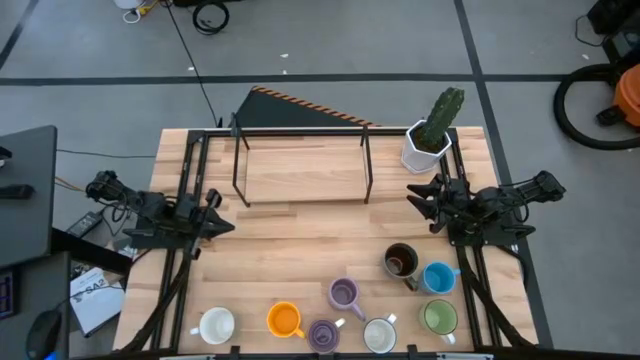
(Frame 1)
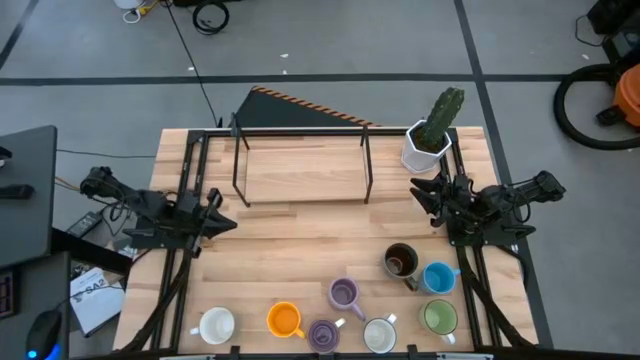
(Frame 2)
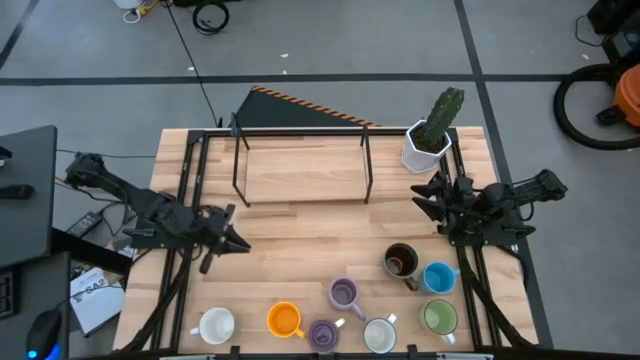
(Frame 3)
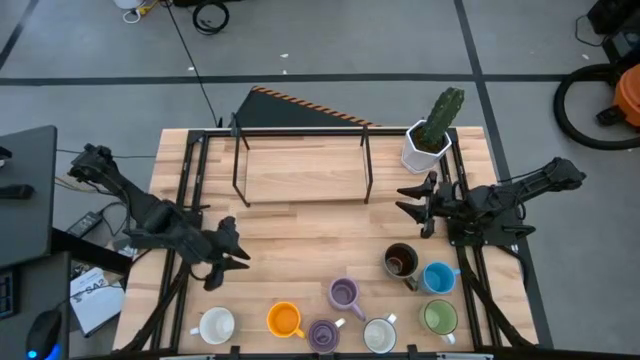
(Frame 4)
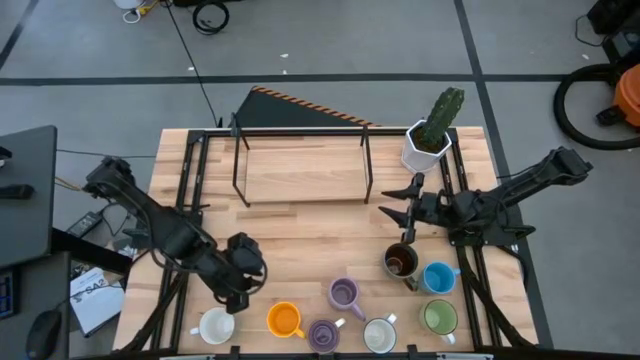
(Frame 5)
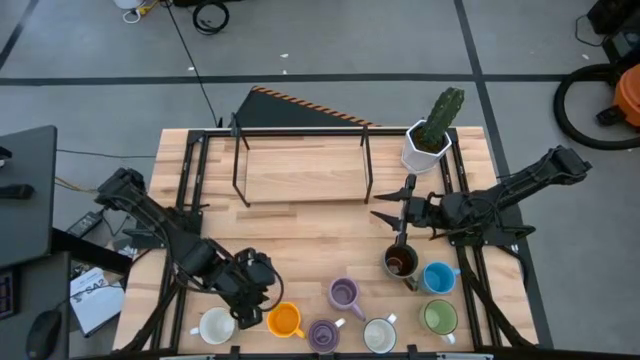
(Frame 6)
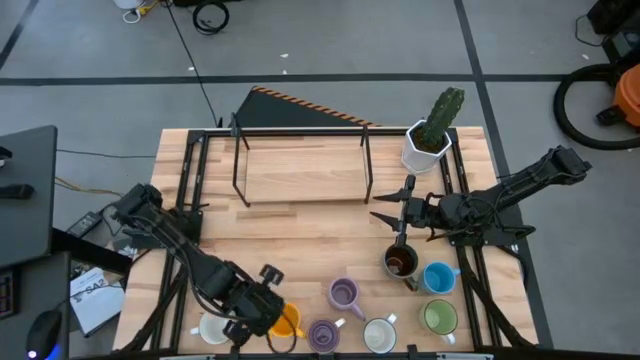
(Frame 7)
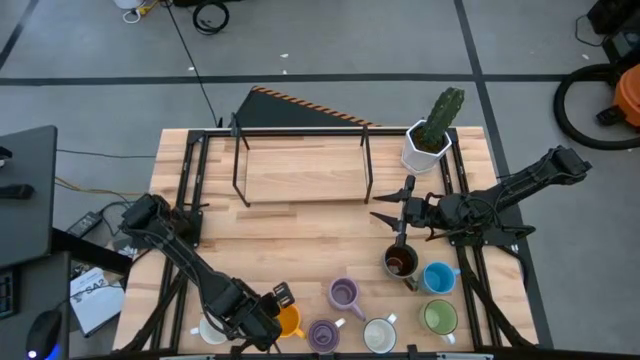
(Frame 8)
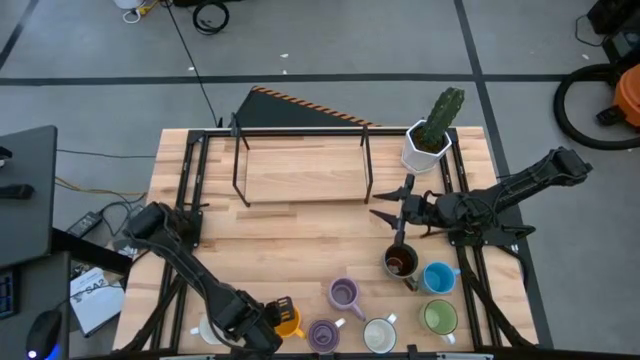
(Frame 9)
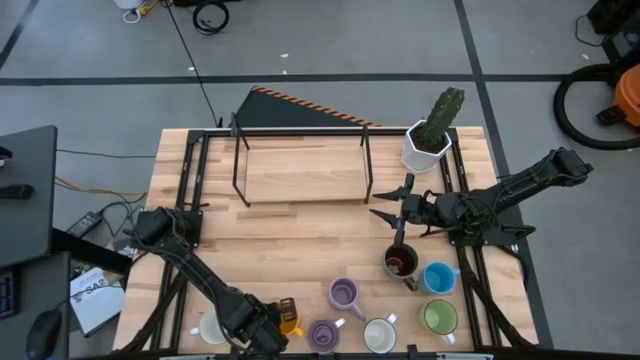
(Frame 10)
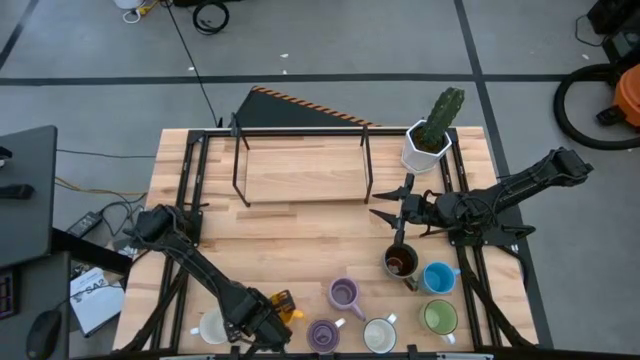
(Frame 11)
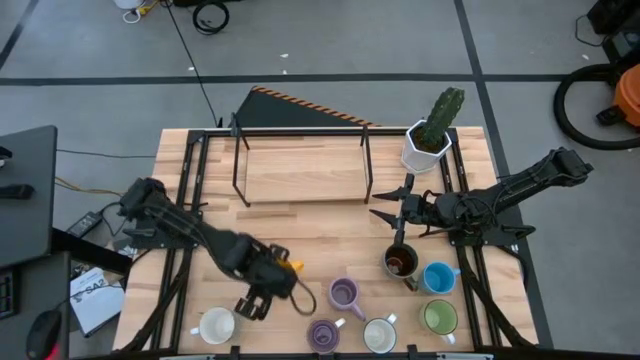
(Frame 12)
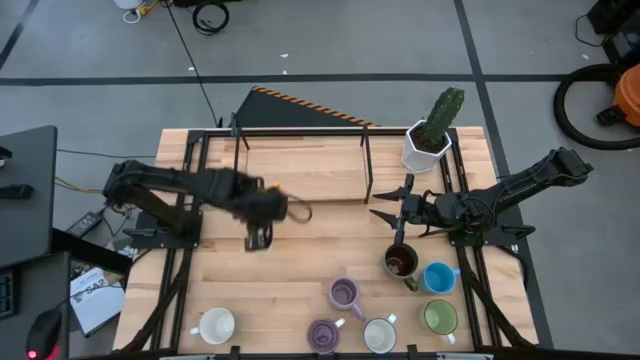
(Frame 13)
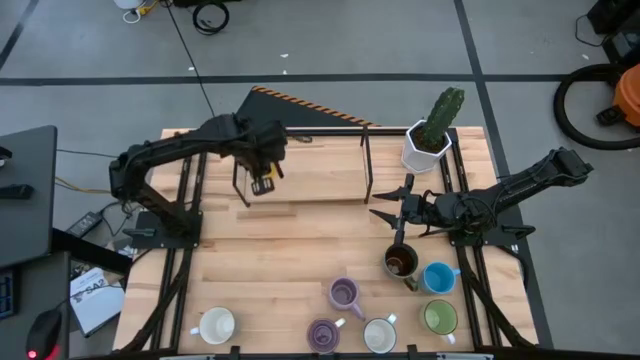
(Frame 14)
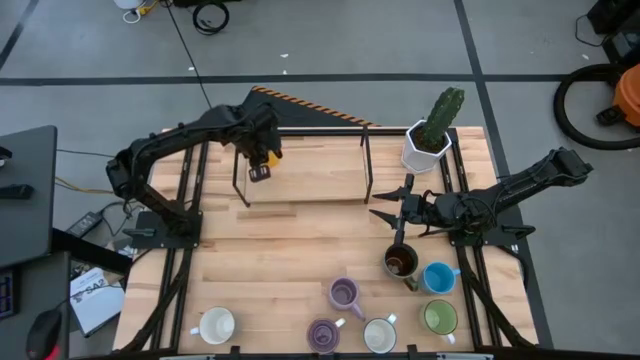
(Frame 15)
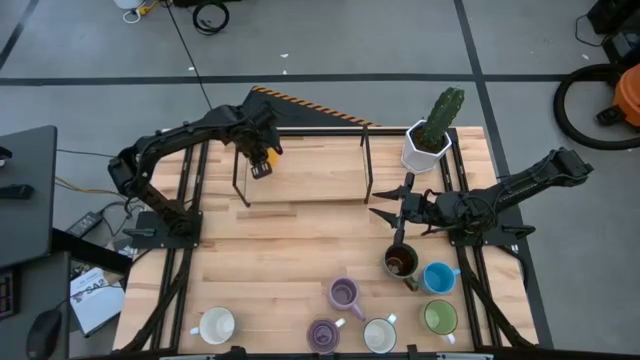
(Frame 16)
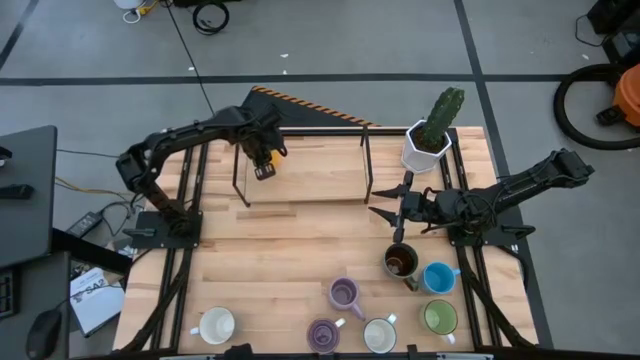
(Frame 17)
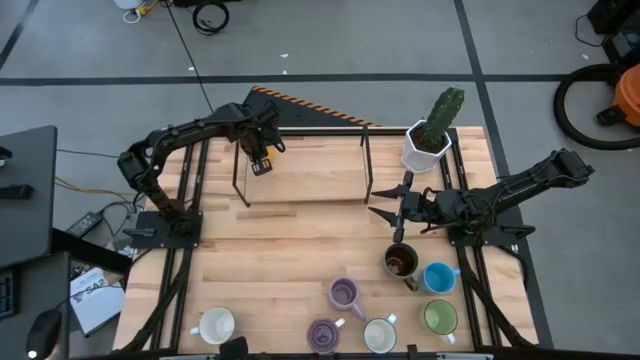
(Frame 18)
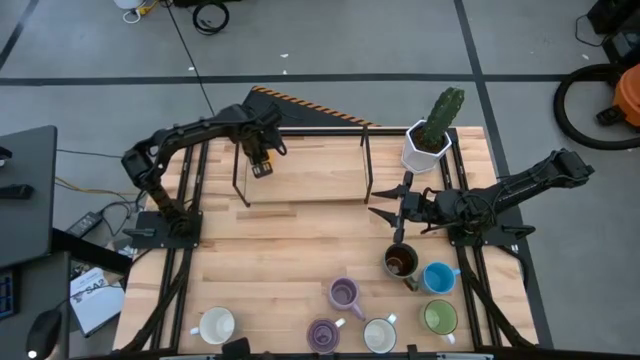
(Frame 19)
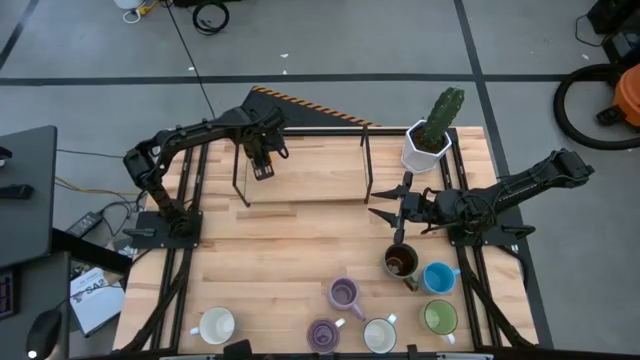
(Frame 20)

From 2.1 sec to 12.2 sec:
Task: Place coffee mugs
Put the yellow mug on the shelf

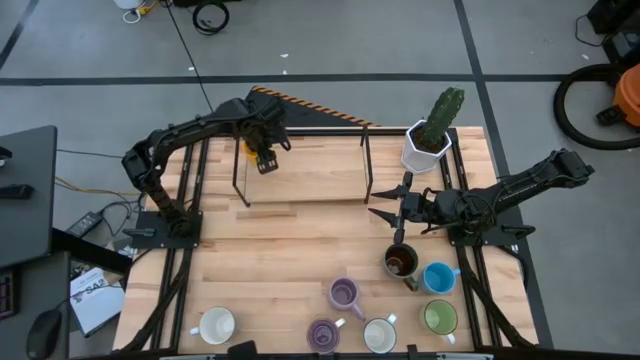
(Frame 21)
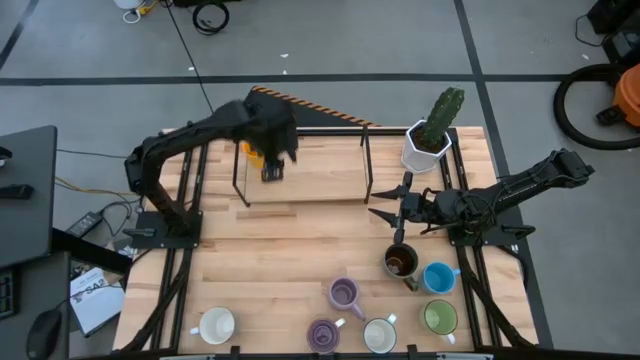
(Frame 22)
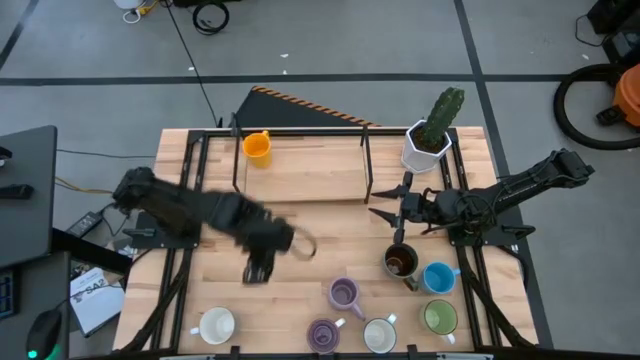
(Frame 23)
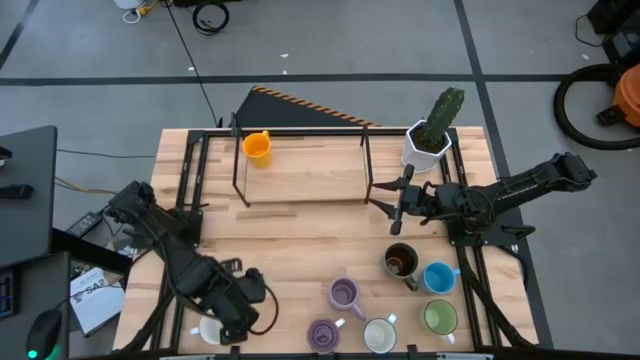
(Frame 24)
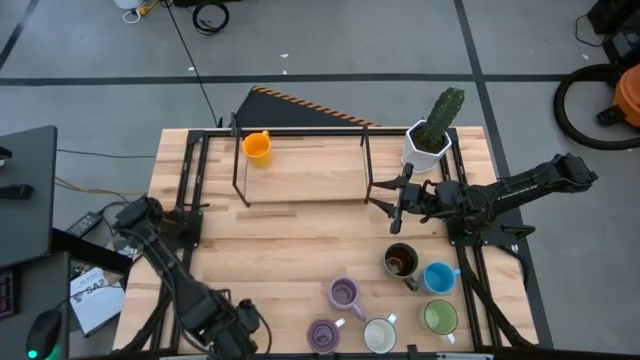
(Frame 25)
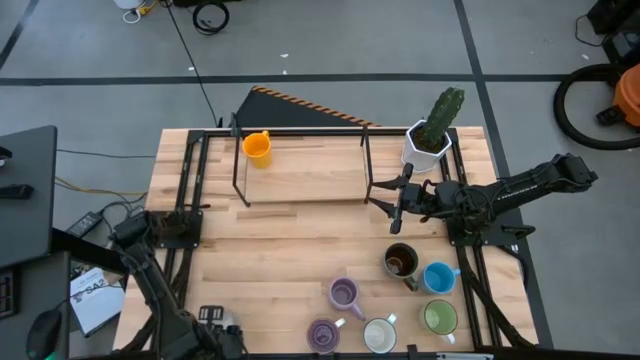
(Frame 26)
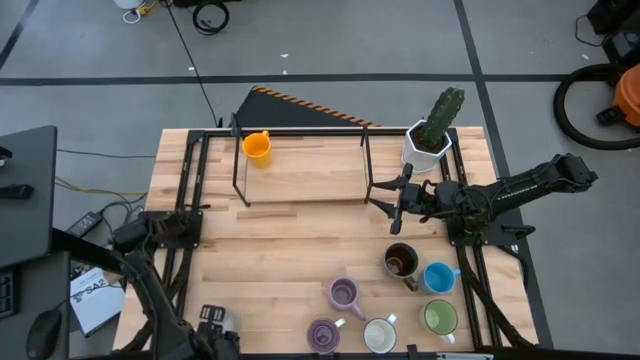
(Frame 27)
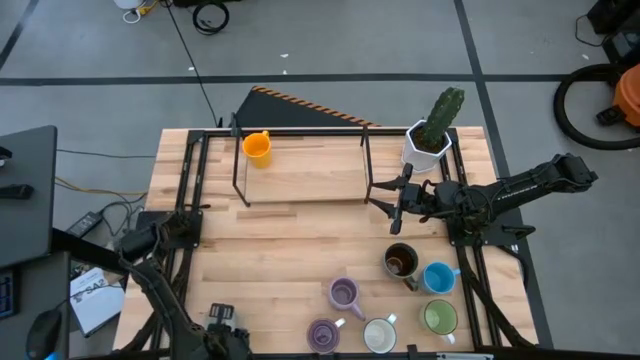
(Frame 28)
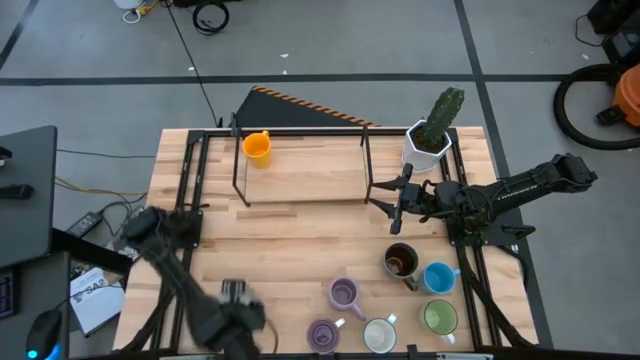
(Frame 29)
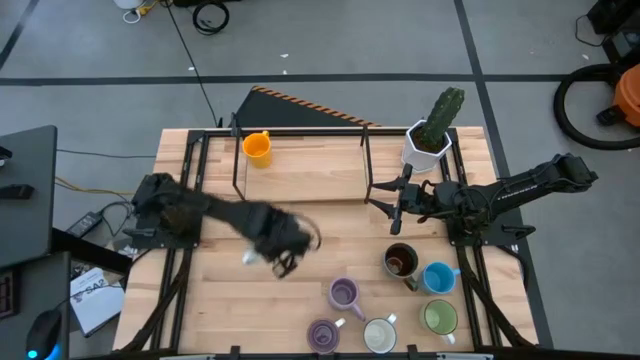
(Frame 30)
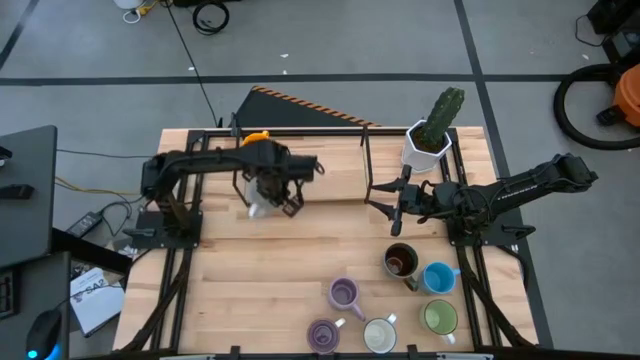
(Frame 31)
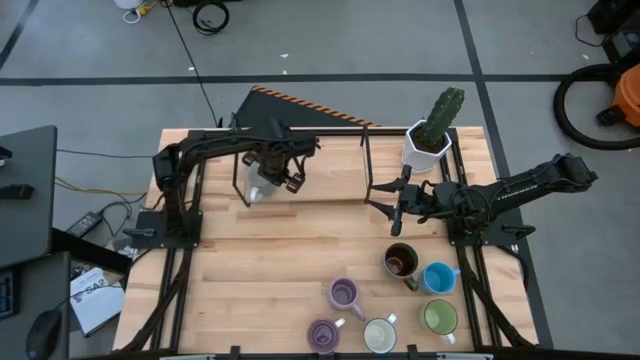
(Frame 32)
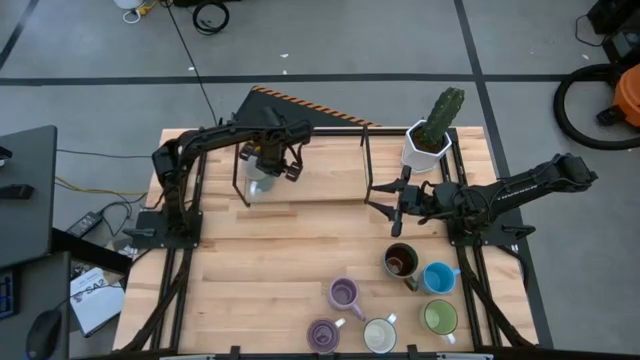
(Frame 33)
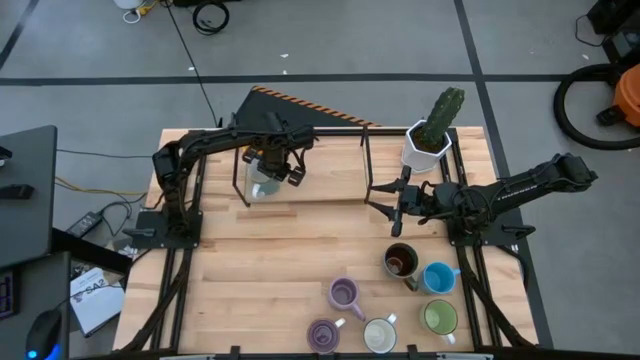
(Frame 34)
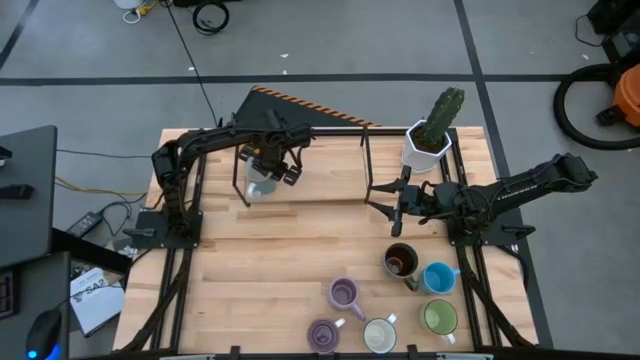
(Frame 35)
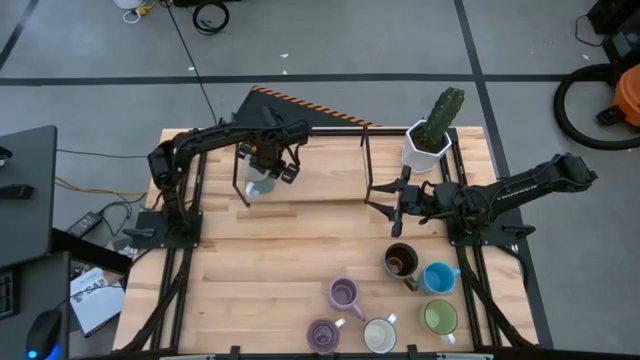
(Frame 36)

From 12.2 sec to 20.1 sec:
Put the light blue mug on the shelf

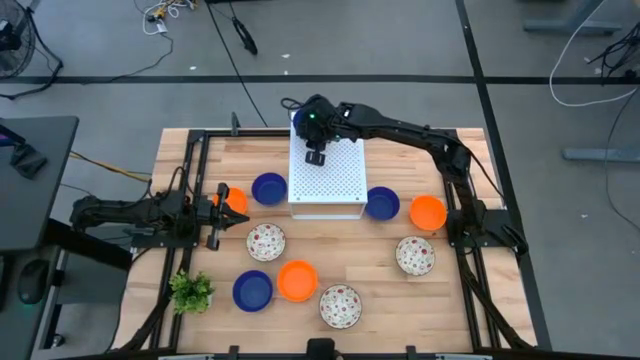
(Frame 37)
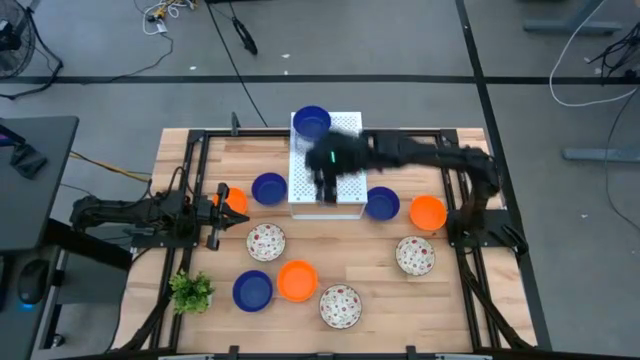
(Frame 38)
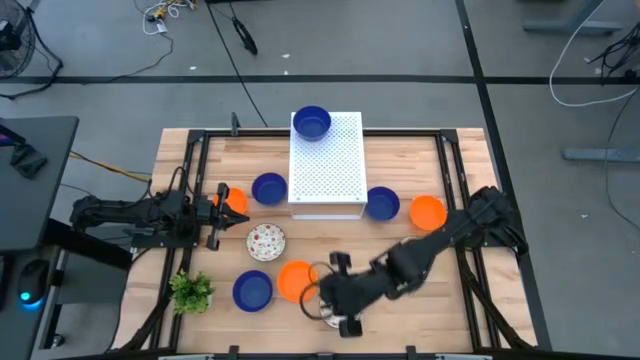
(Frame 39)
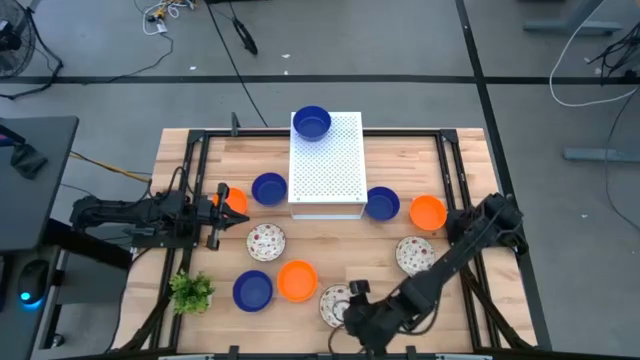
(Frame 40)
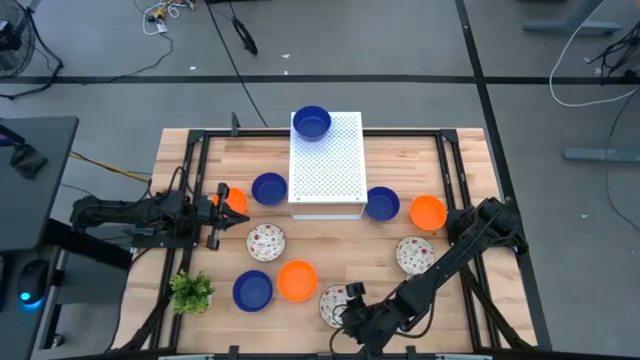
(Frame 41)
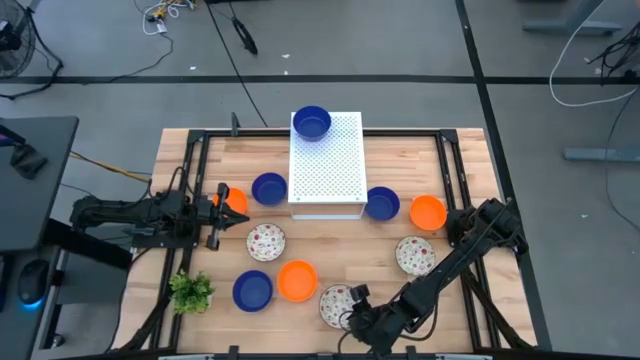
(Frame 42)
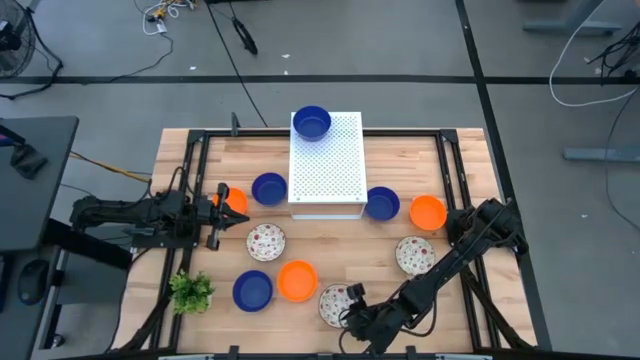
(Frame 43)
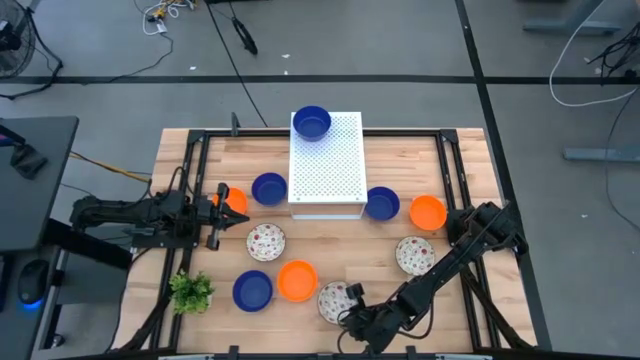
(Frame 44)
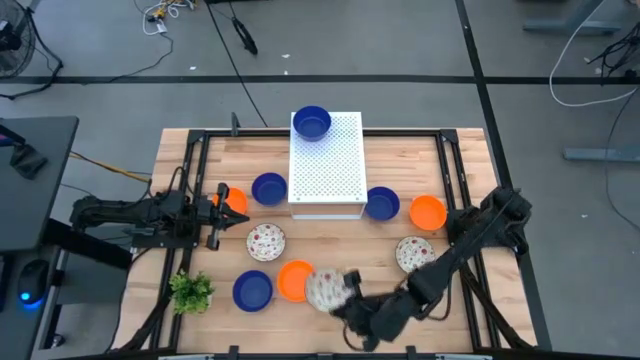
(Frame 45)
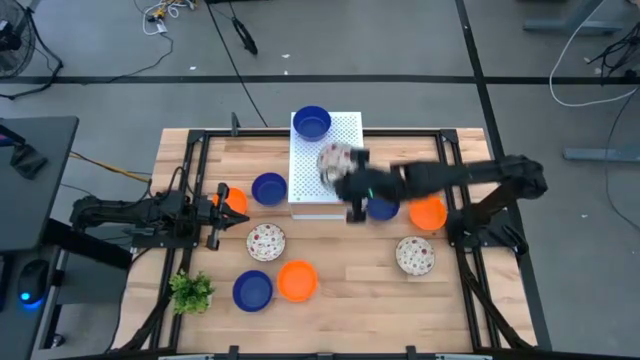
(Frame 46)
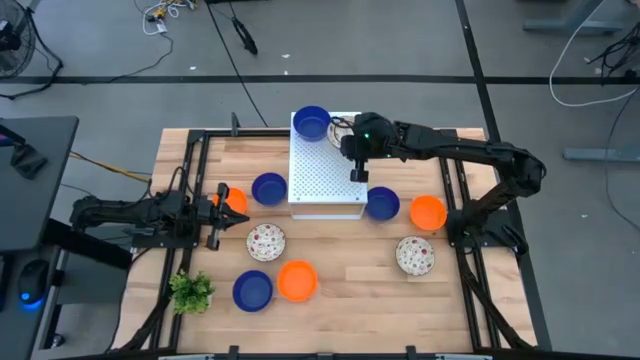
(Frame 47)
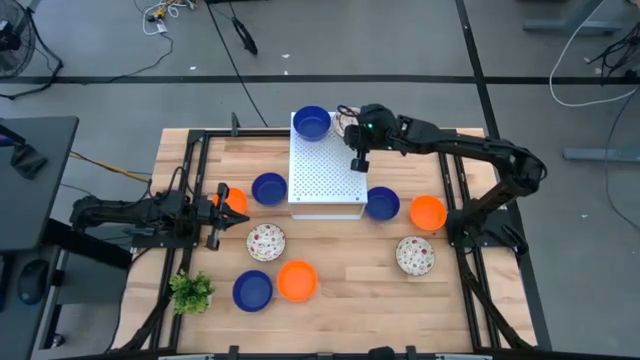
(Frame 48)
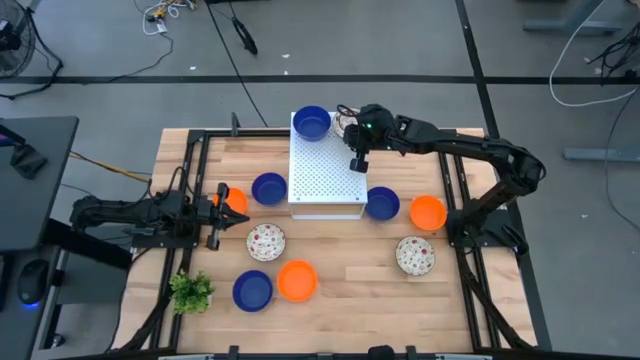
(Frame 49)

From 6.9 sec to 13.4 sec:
Task: Pick & Place Mini bowls
Put the middle white patterned bowl on the shelf
